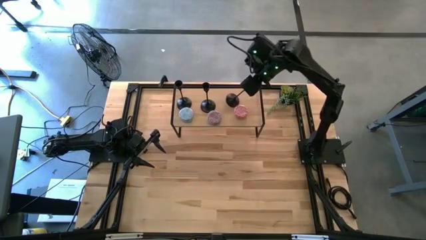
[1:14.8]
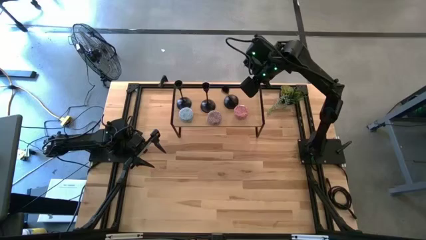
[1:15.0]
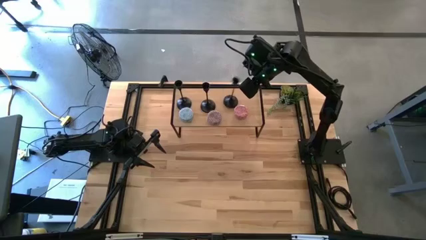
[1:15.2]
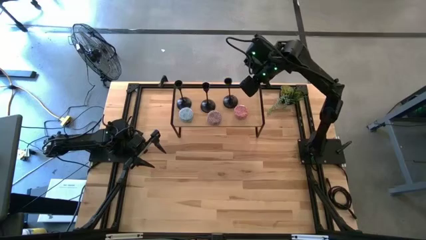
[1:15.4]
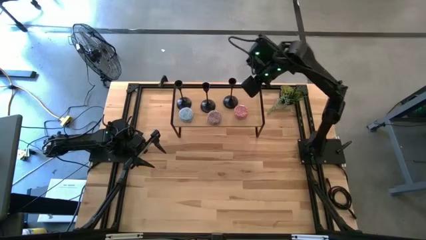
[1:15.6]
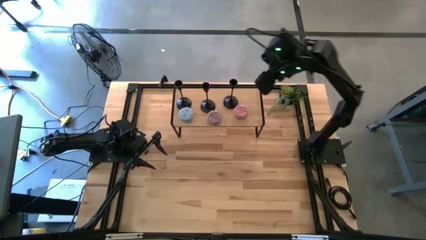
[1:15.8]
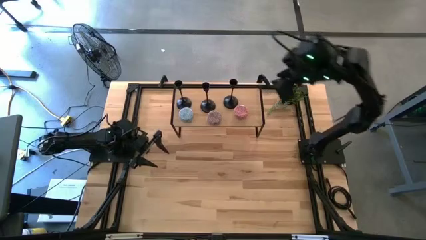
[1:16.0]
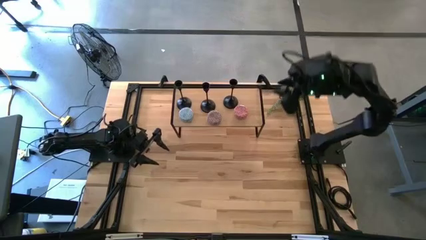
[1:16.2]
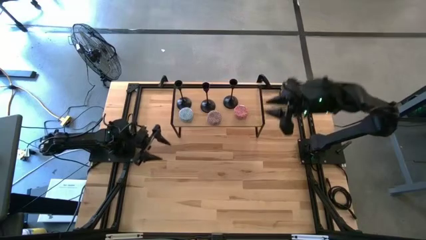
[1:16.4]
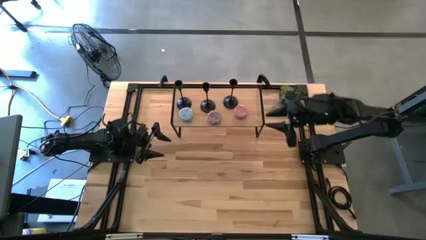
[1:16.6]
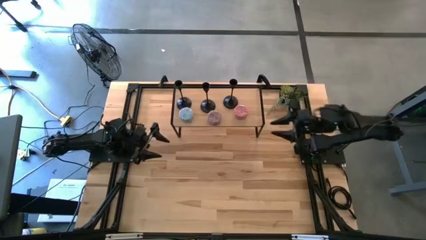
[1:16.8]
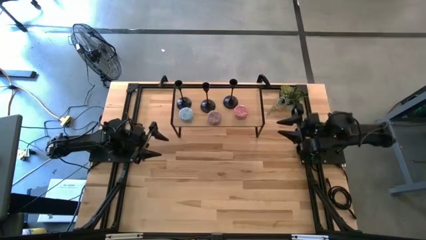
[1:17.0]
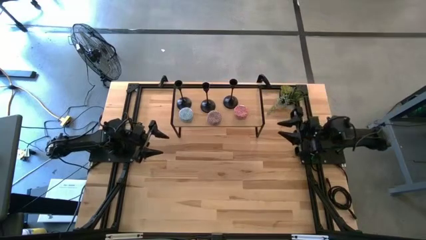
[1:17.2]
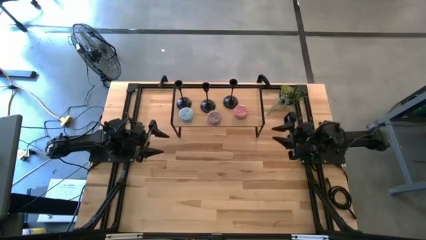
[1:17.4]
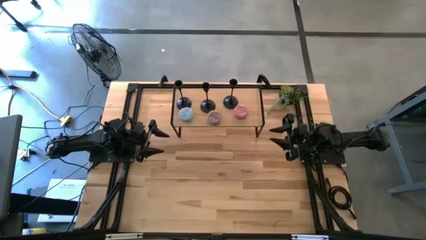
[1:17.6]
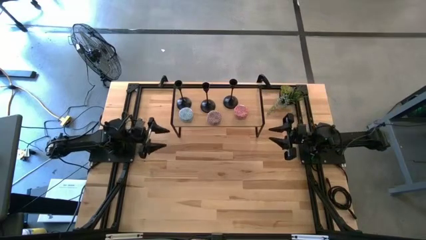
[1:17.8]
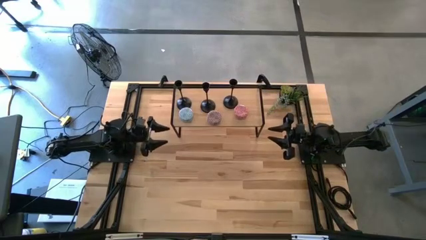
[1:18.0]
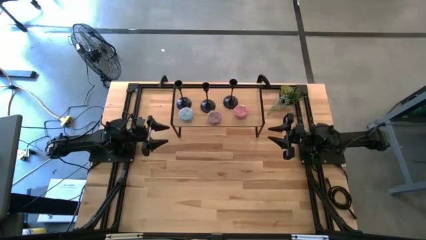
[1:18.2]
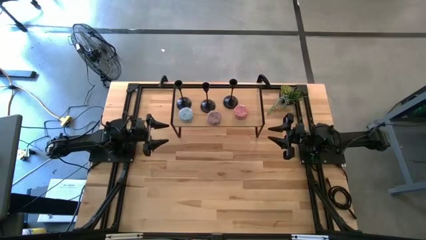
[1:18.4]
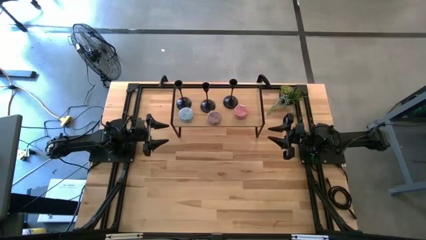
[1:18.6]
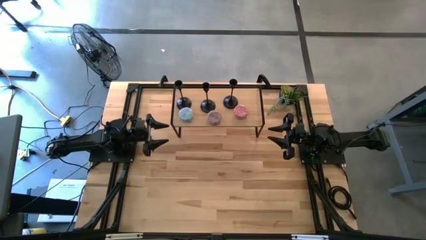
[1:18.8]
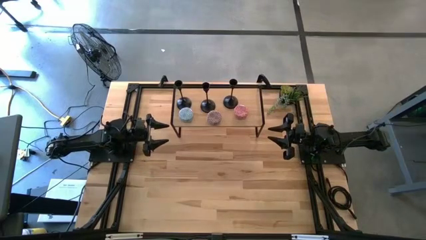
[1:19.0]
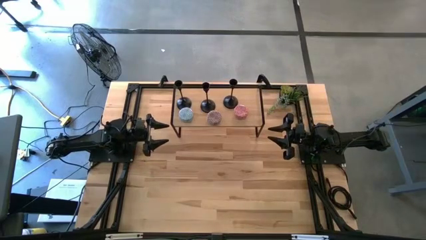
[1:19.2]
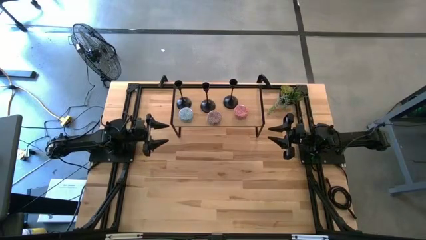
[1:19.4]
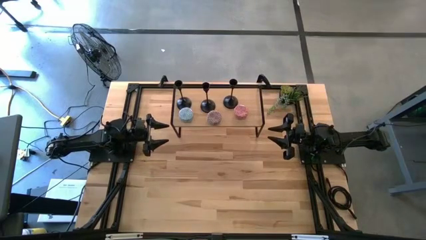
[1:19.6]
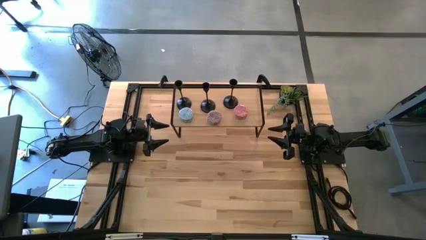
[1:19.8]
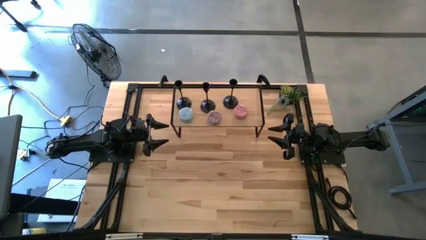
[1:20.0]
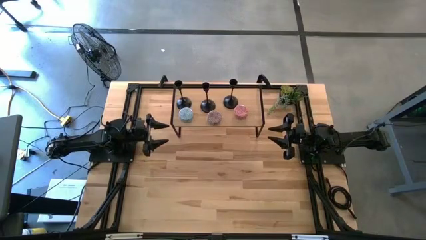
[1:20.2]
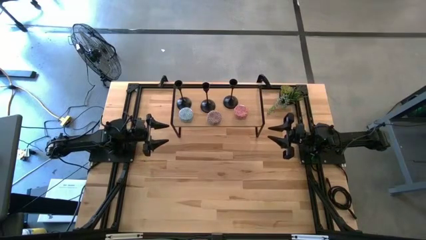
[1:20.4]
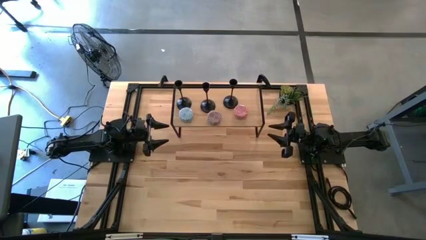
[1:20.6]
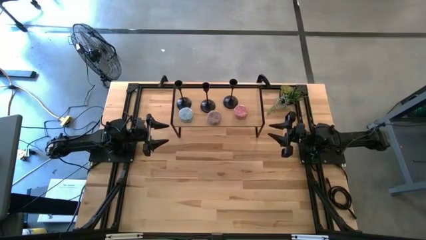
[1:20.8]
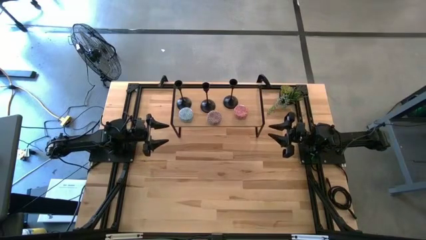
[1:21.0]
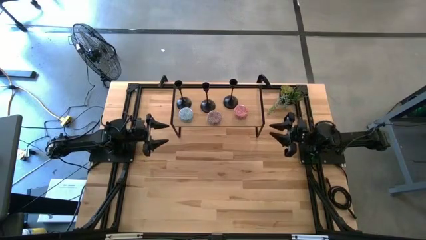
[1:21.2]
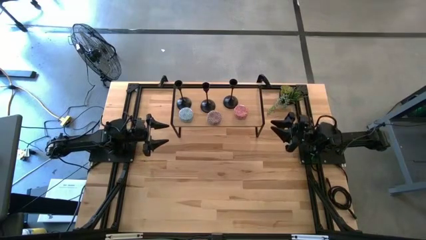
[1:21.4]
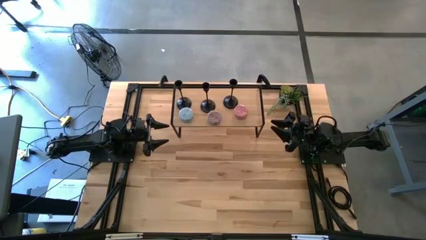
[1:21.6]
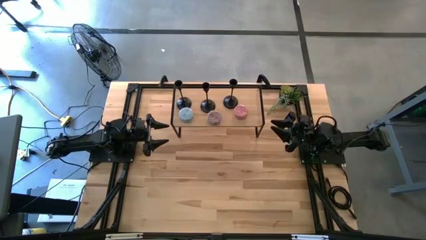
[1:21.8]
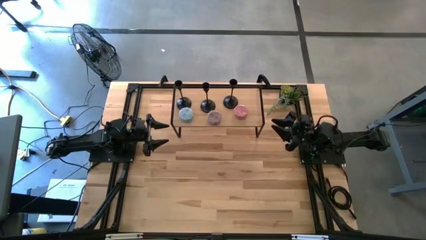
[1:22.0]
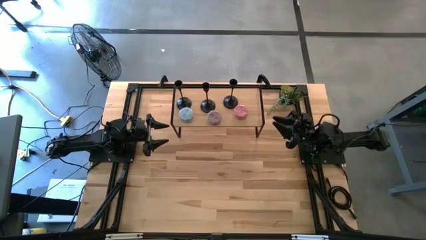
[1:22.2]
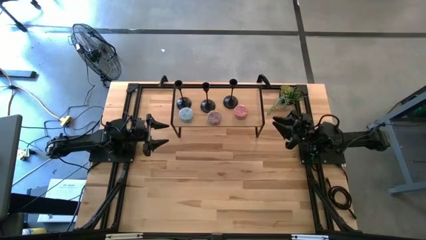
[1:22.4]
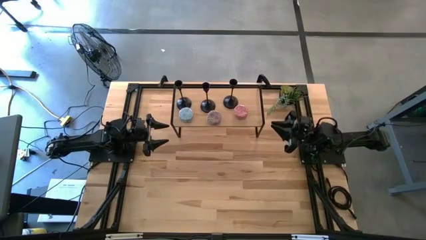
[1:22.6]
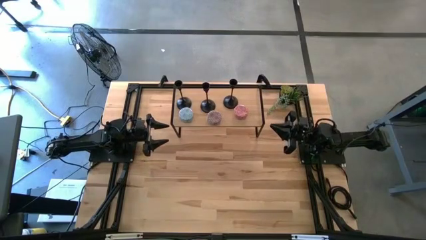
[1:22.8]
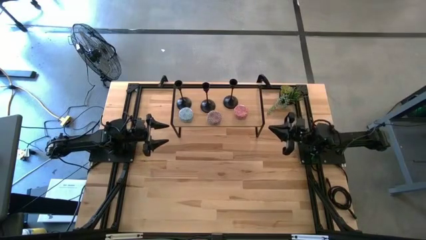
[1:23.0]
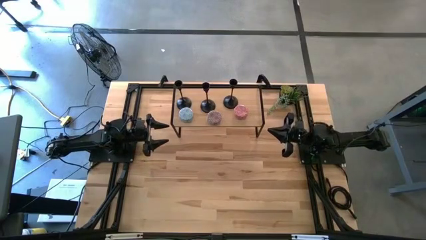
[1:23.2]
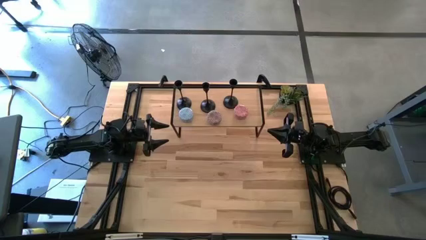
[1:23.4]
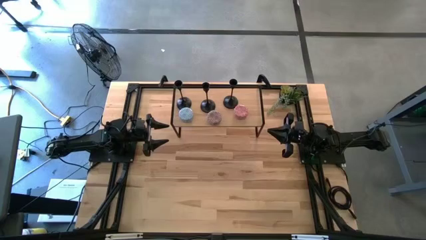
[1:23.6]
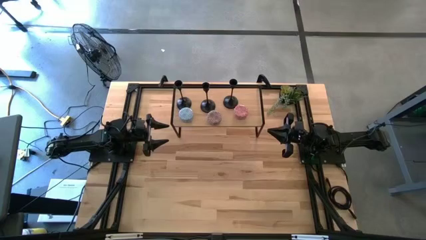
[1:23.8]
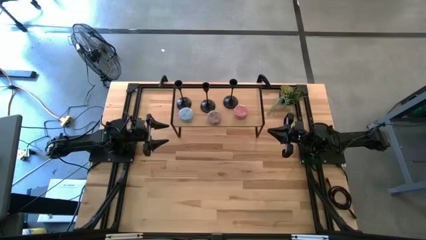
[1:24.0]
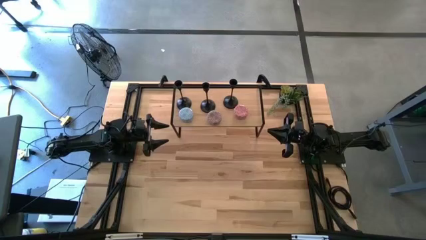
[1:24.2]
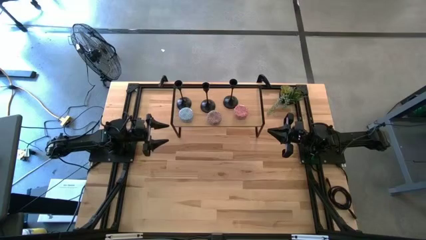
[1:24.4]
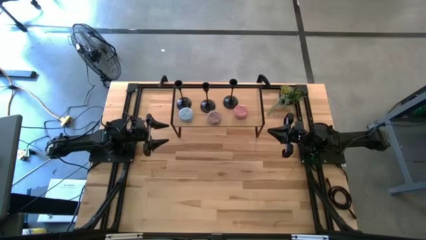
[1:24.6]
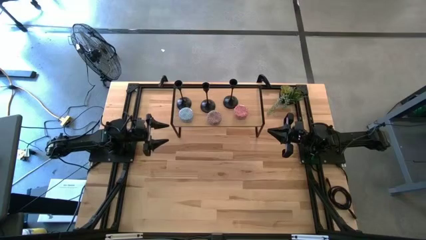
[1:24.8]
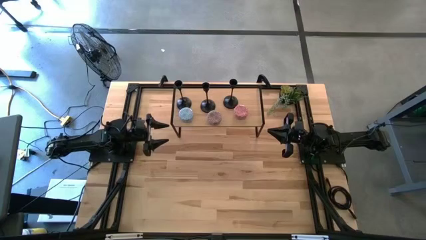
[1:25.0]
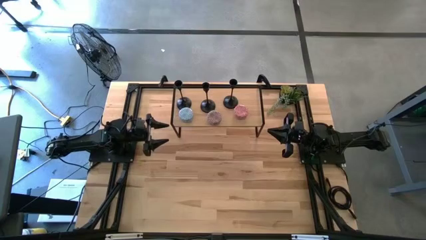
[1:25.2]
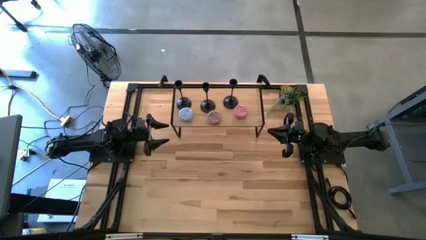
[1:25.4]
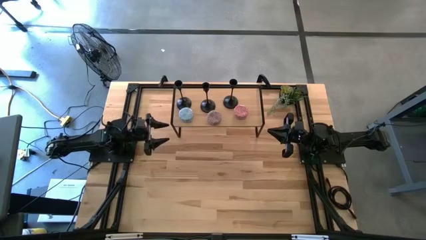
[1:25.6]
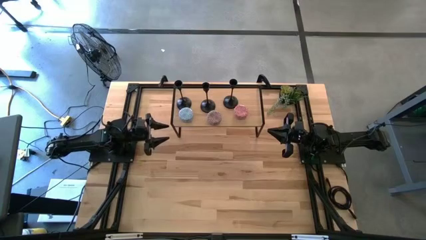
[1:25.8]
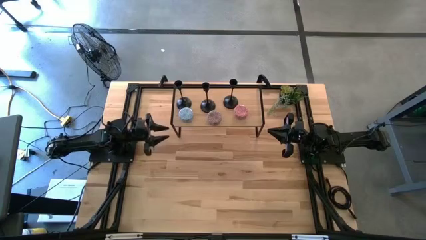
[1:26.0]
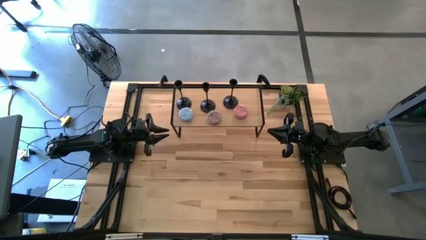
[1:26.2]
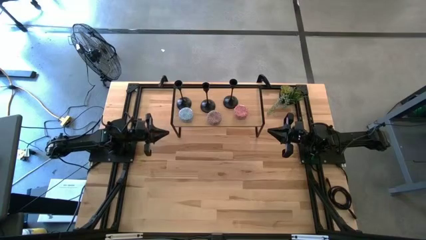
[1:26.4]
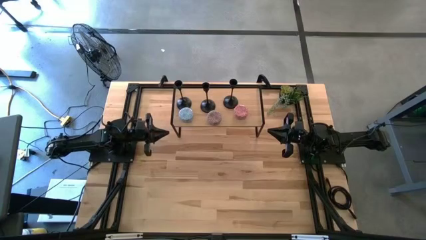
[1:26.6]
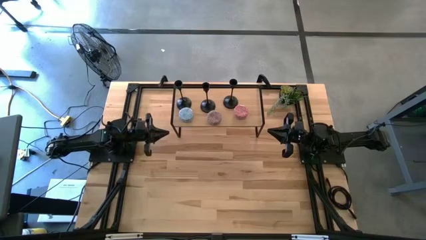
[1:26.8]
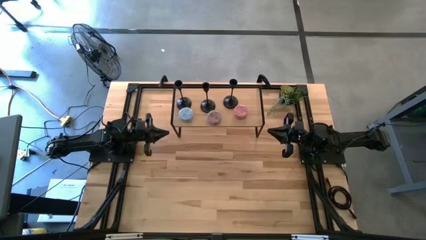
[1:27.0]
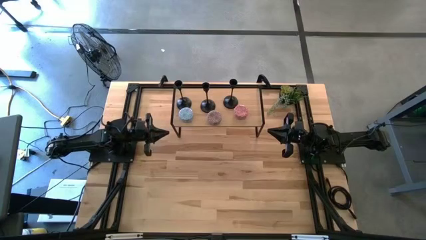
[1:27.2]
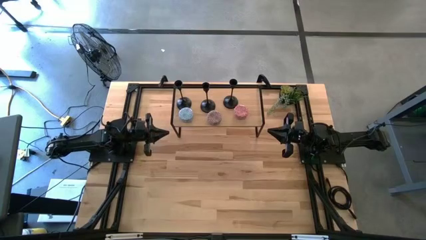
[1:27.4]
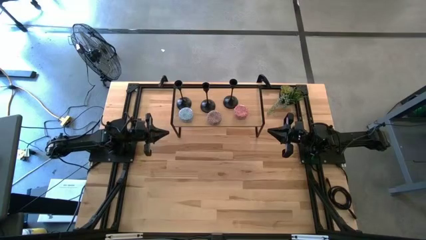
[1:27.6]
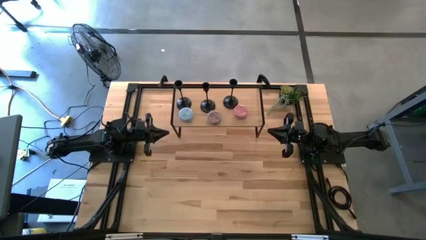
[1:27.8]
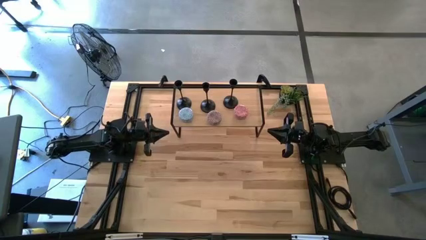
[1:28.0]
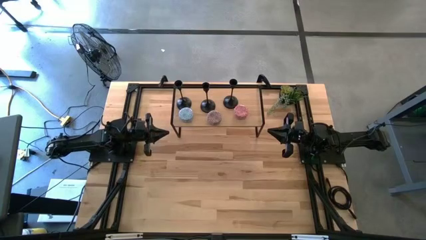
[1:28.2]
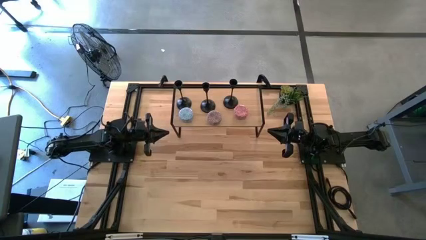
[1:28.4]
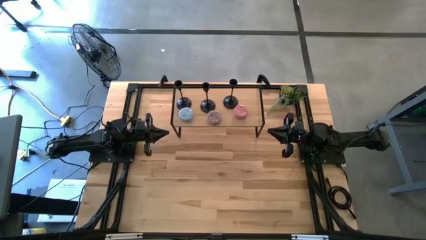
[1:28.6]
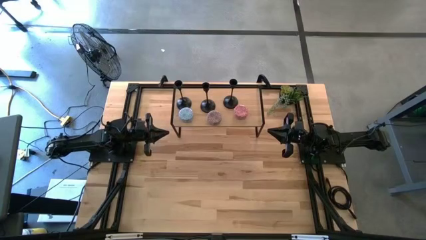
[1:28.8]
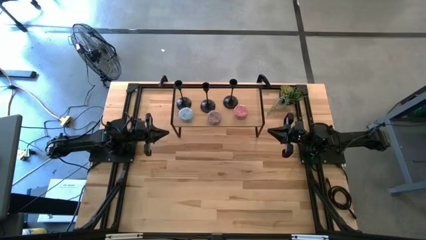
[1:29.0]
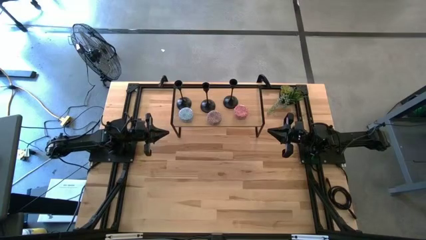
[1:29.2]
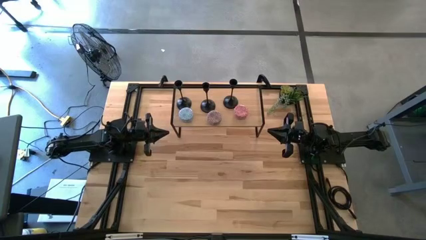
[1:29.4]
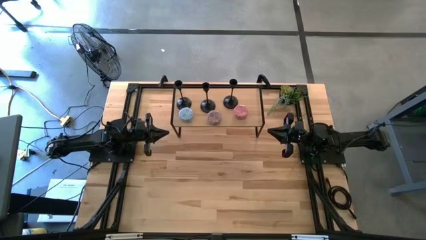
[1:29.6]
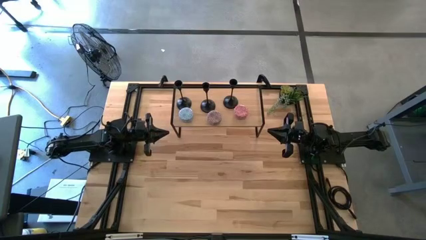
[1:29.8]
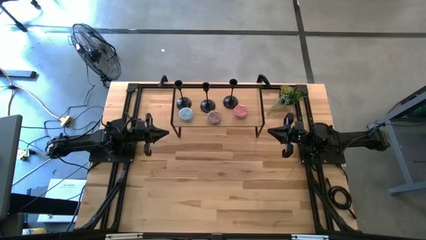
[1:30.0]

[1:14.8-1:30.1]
Task: Pick & Place candle stick holders
Return to Home Position
